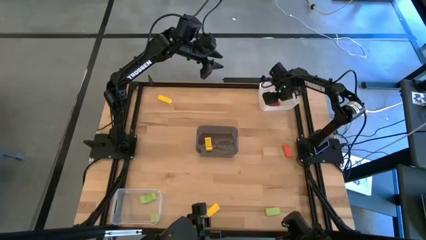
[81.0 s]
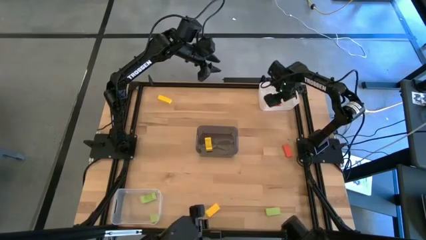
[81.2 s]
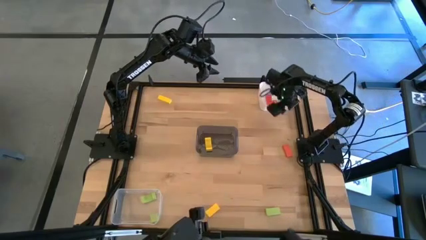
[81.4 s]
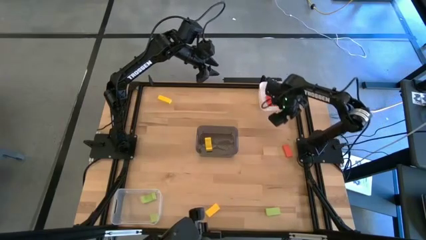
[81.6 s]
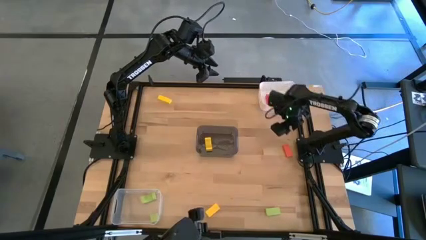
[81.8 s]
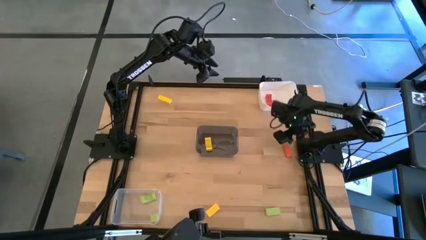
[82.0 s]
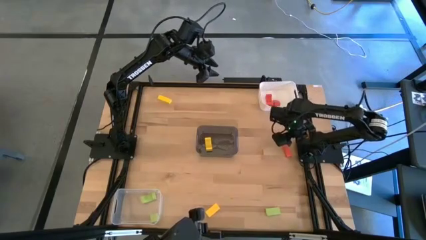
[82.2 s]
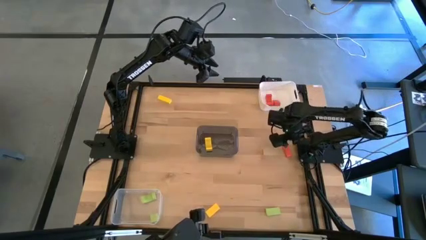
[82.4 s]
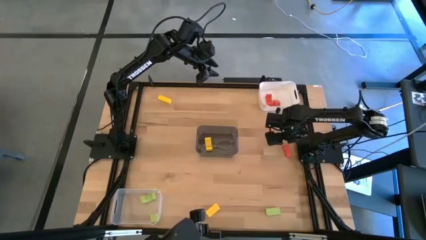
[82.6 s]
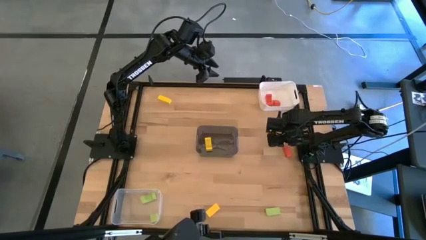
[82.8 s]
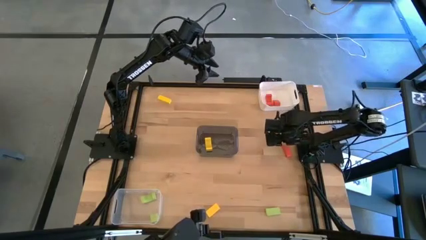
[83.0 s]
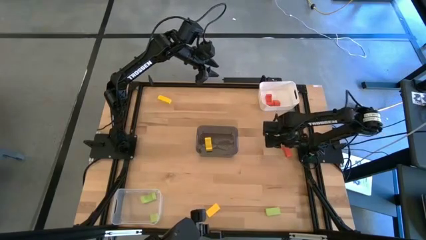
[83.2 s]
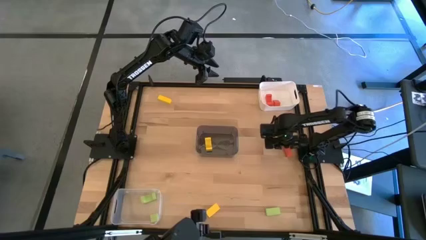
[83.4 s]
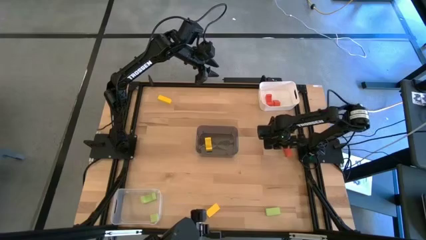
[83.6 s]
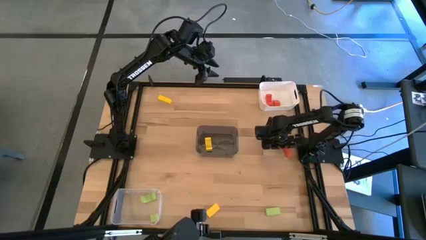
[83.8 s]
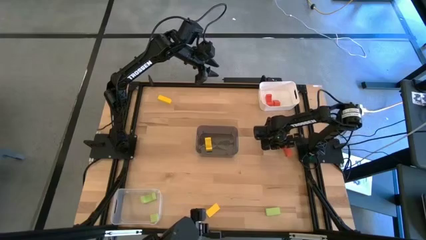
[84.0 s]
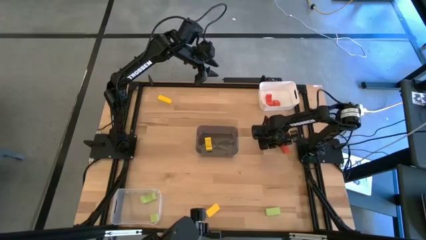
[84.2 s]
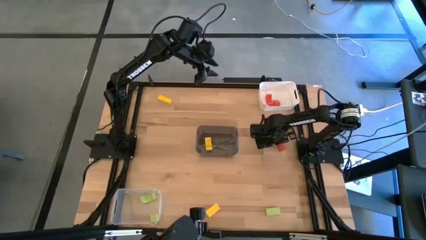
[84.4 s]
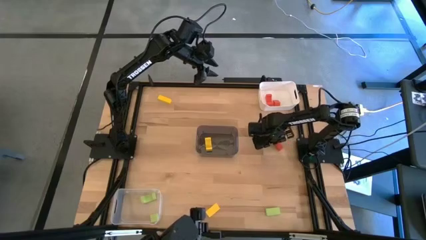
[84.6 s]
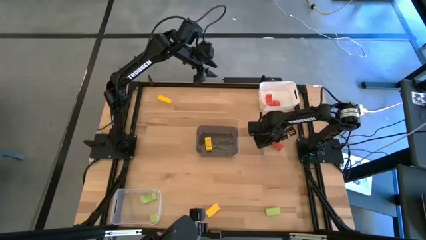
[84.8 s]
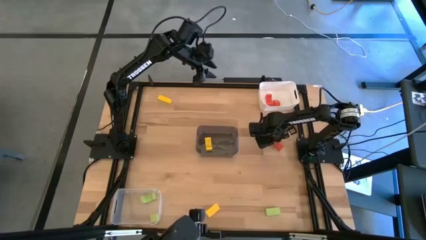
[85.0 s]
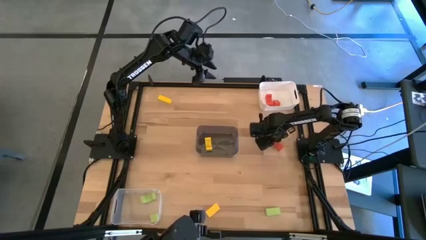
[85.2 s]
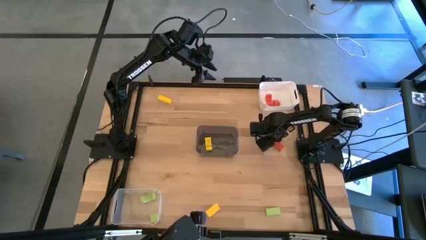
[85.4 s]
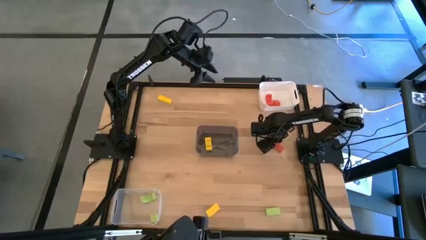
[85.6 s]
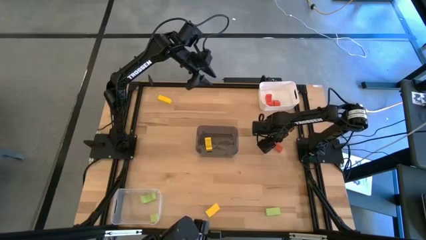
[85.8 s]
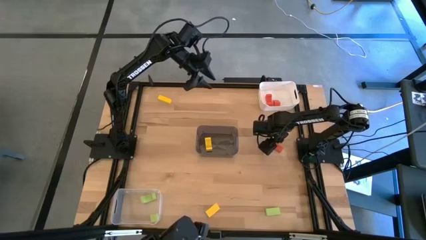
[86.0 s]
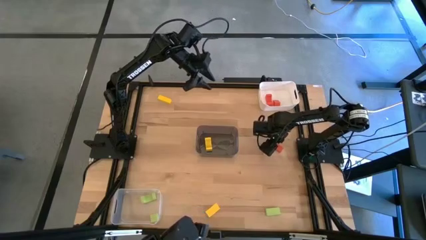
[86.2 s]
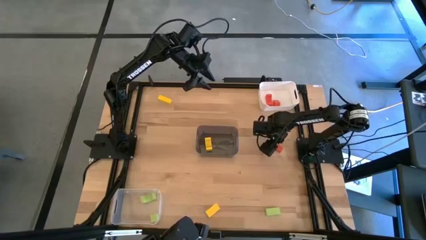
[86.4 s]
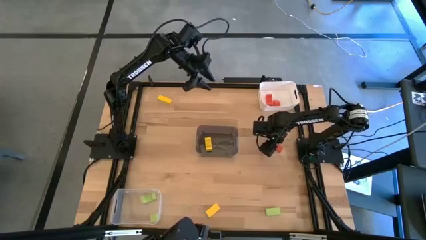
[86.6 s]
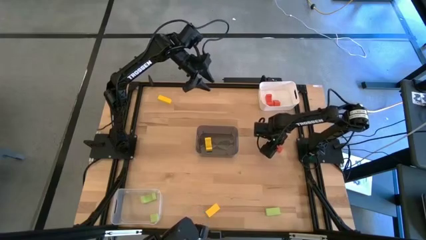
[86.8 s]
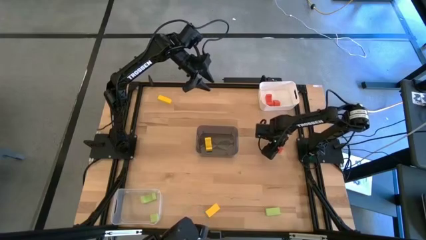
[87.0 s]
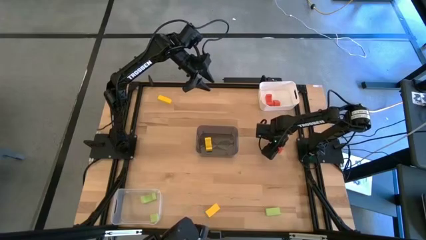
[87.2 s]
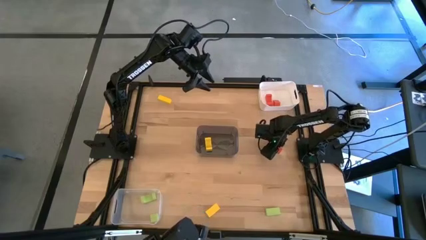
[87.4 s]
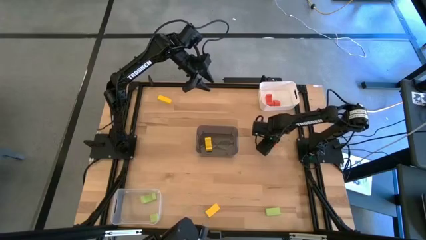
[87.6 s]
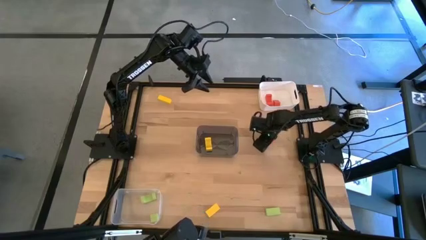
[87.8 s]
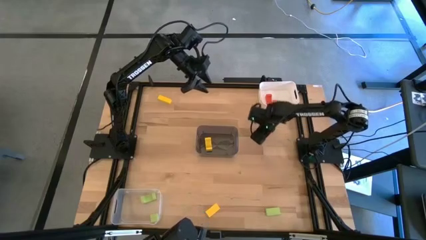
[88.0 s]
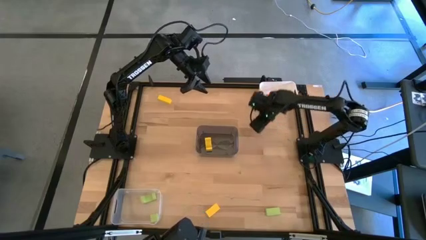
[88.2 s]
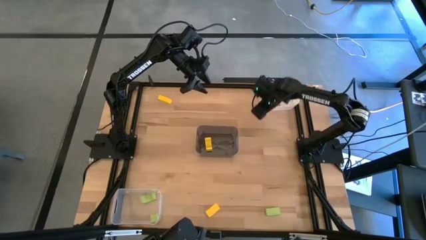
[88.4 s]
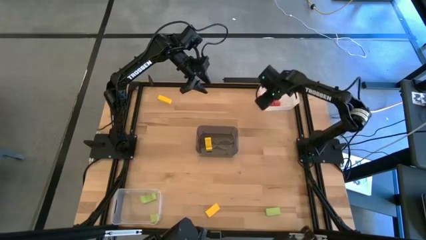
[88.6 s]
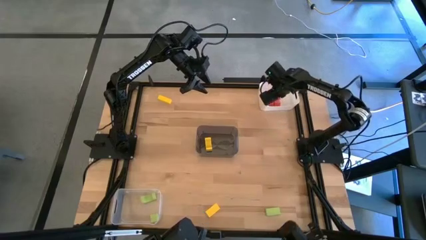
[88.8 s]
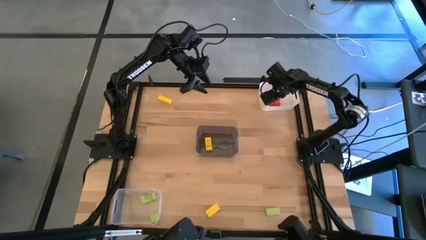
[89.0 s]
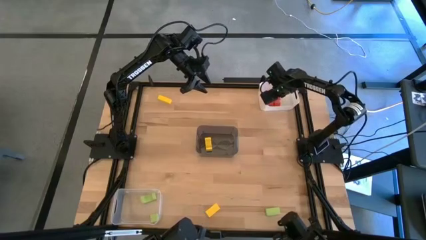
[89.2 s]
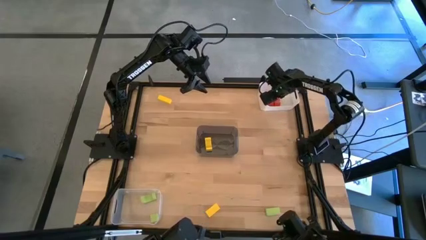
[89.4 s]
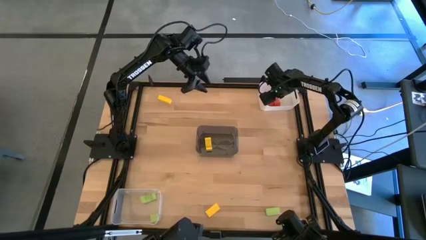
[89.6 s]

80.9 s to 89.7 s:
Task: Sort & place blocks by color
Put the orange block into the white bin

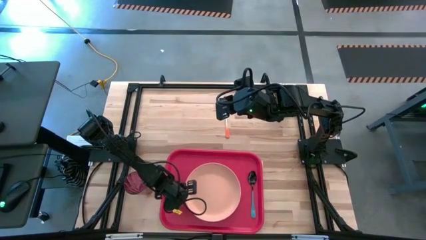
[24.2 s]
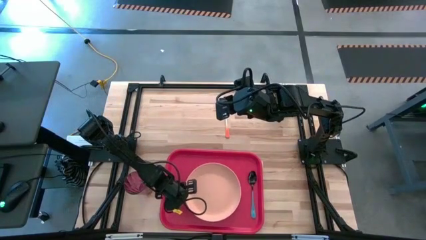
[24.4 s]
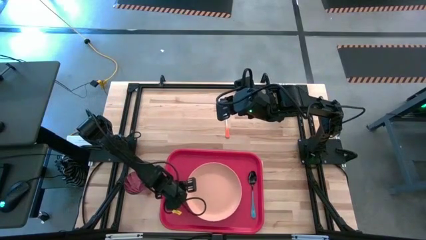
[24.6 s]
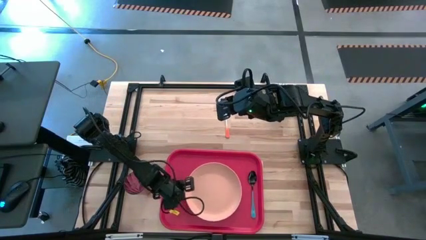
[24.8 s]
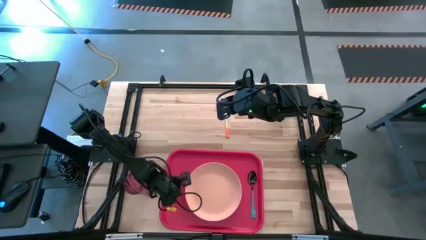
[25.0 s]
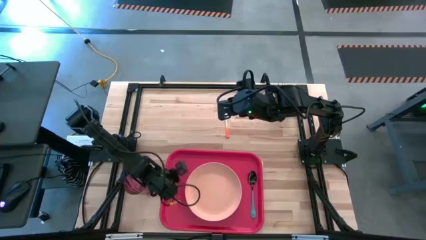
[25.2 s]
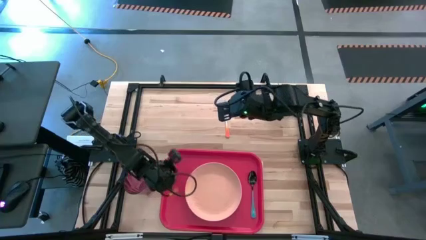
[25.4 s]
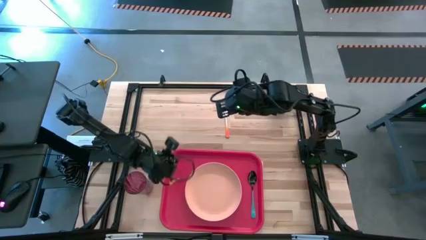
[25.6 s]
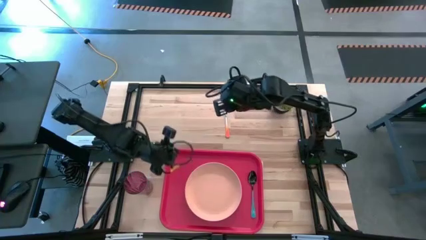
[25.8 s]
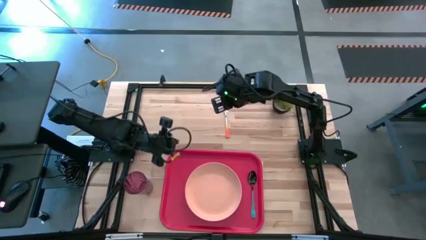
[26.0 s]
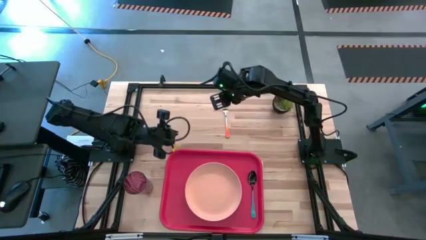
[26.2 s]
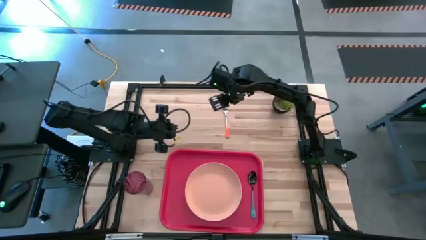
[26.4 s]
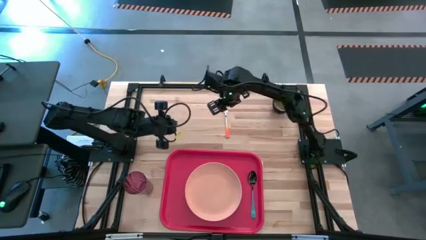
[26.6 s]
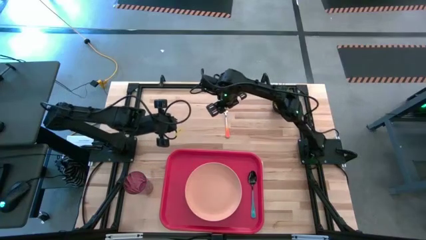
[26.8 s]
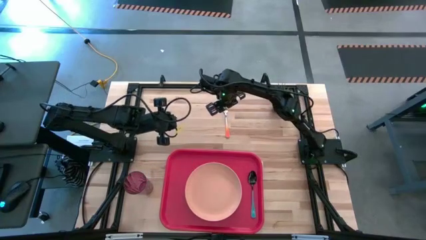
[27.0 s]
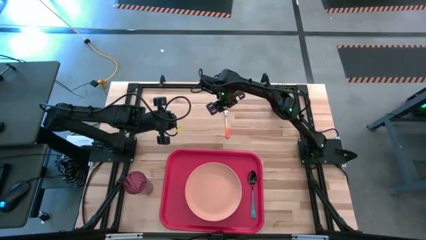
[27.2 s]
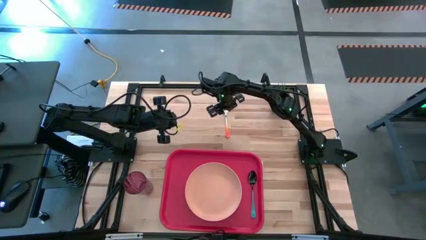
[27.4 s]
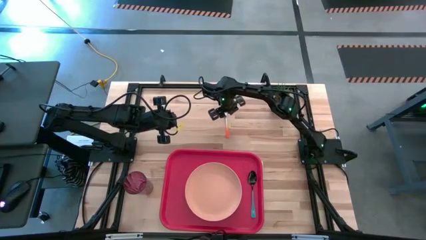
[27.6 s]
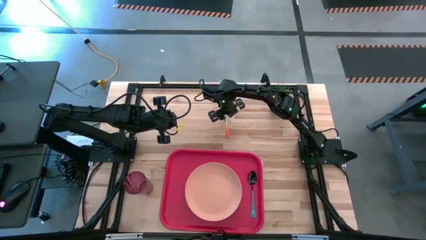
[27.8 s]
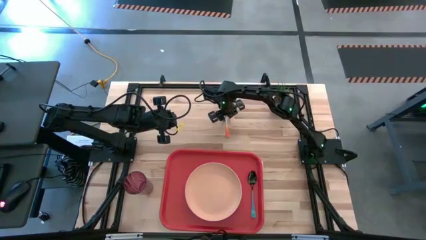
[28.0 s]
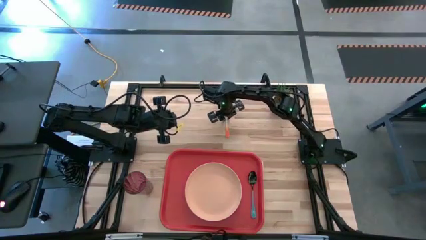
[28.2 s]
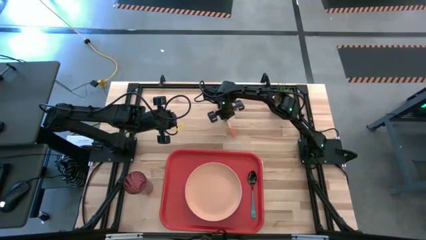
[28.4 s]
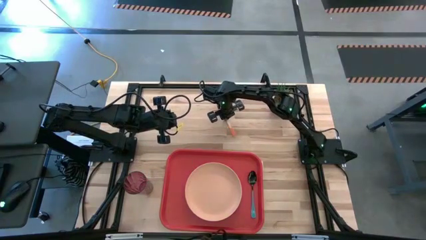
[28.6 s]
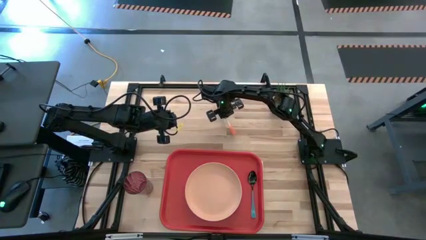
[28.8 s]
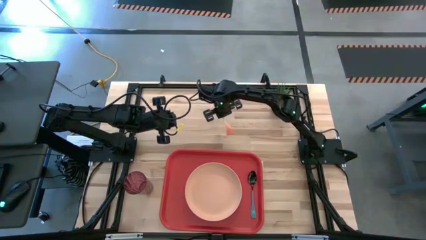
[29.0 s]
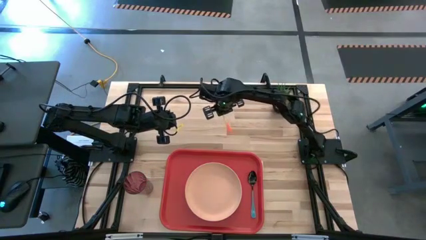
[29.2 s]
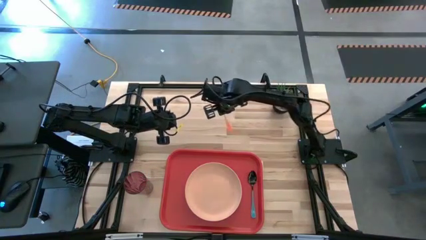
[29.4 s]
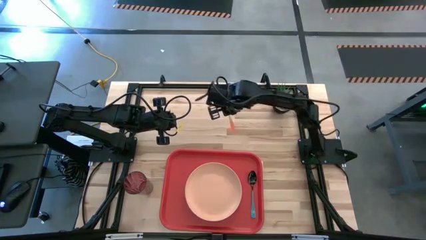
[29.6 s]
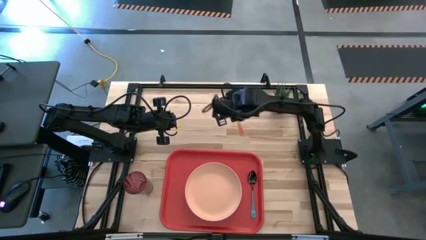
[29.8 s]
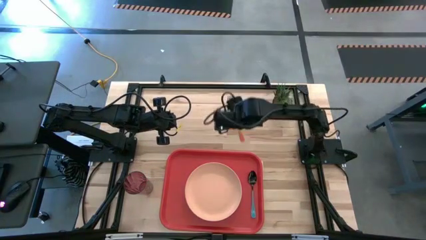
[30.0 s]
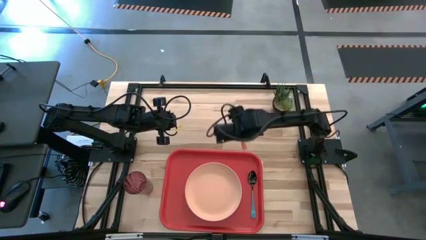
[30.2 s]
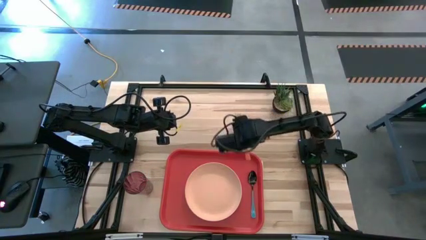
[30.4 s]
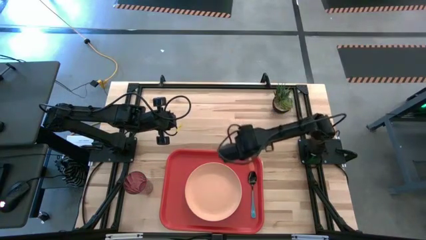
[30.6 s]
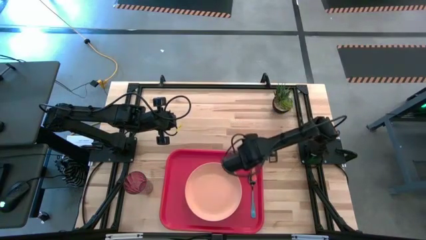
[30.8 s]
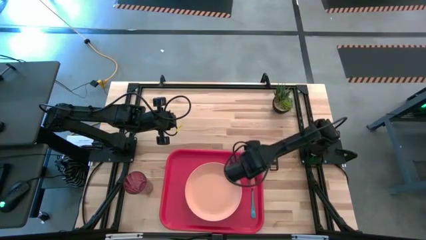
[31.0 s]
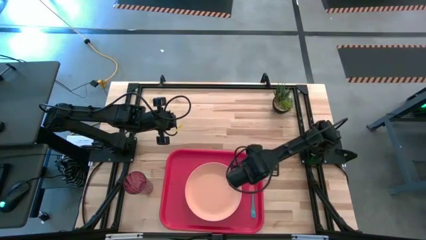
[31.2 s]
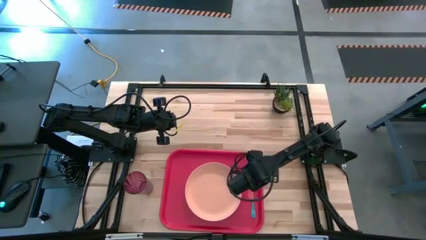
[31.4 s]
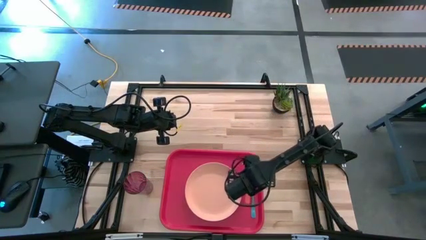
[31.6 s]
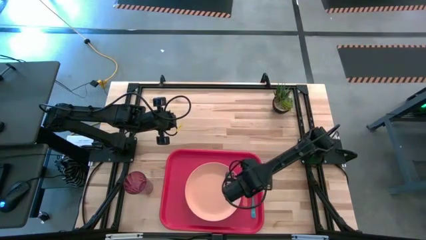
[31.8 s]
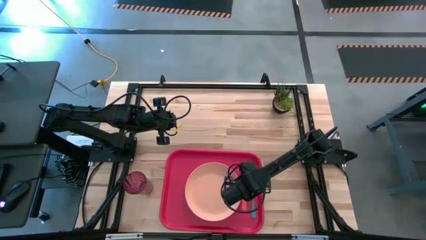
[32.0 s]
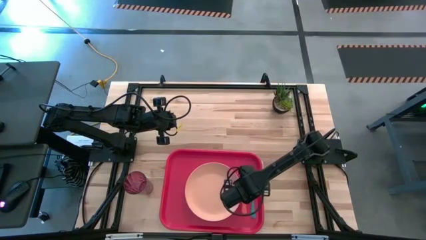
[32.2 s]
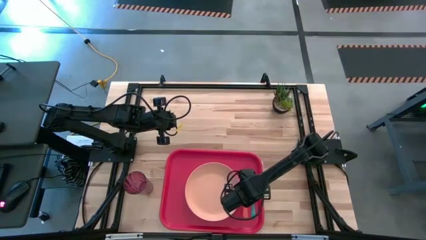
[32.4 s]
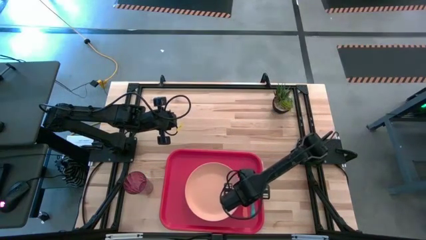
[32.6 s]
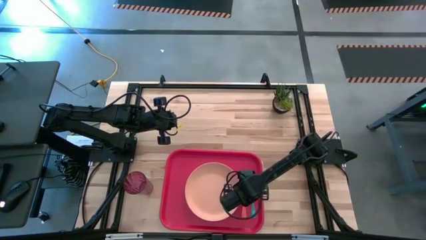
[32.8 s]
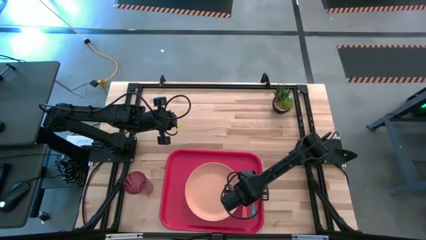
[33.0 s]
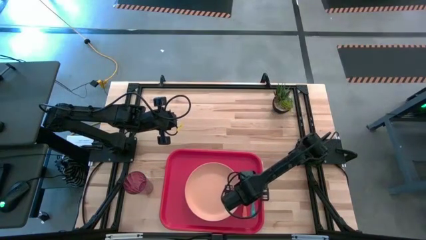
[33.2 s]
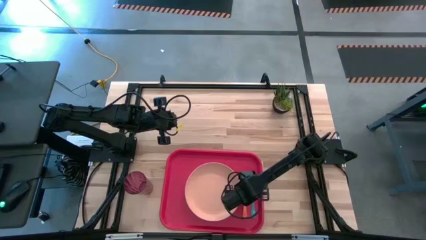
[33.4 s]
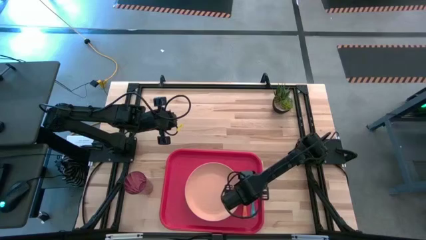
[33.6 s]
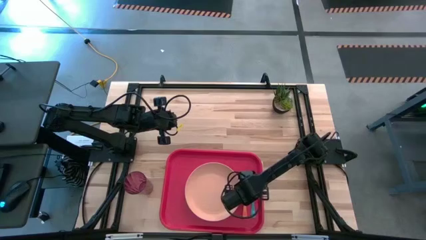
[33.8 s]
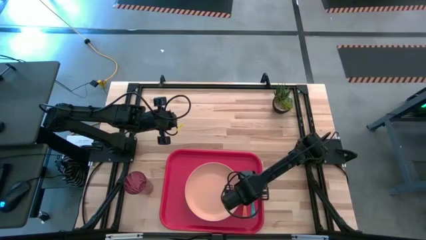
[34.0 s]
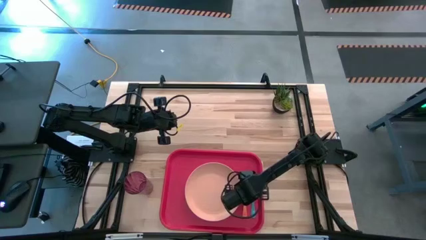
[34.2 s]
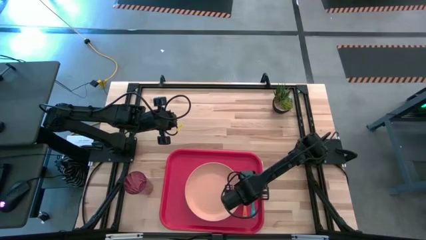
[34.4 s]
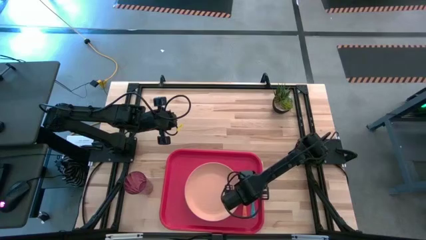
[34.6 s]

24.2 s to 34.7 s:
Task: Pick and place plate/cup/fork/spoon on tray
Put the orange fork on the red serving tray
